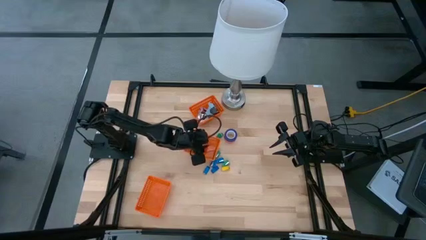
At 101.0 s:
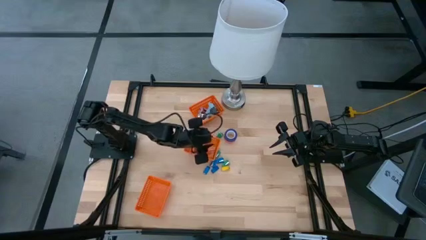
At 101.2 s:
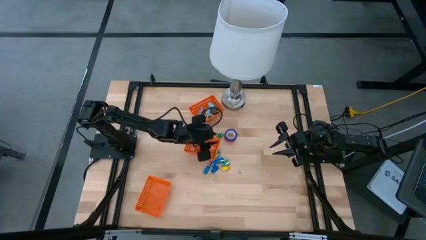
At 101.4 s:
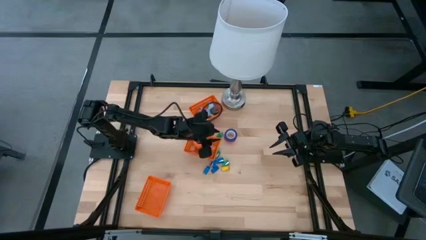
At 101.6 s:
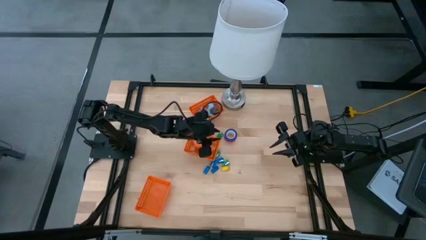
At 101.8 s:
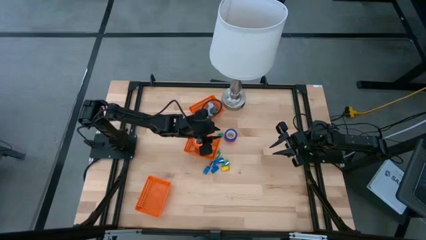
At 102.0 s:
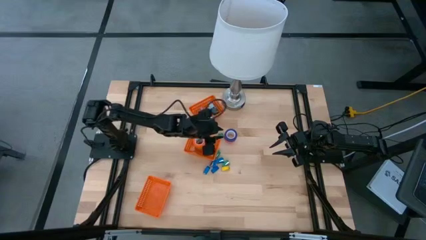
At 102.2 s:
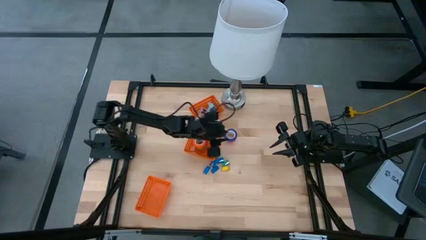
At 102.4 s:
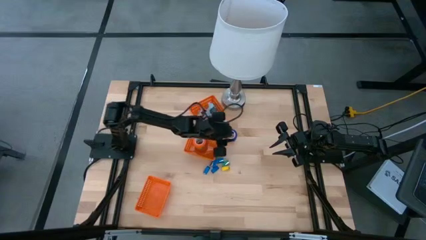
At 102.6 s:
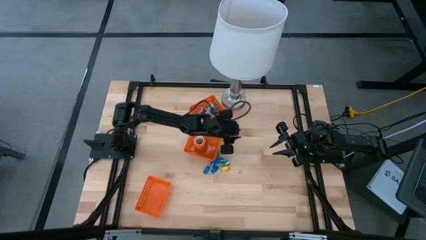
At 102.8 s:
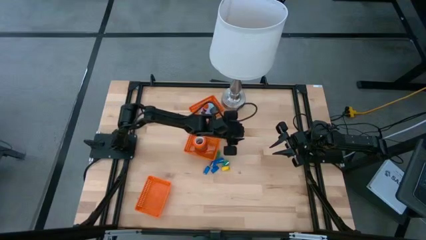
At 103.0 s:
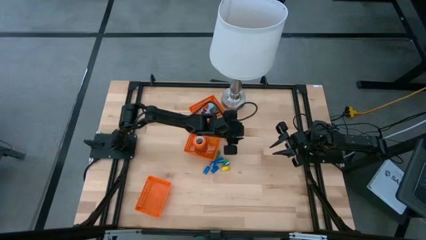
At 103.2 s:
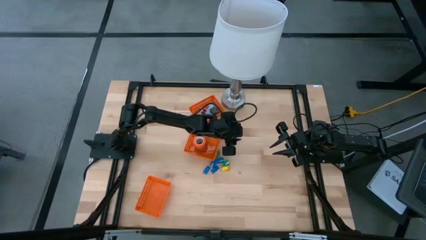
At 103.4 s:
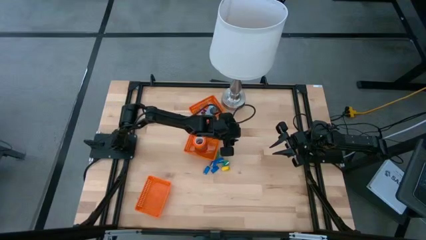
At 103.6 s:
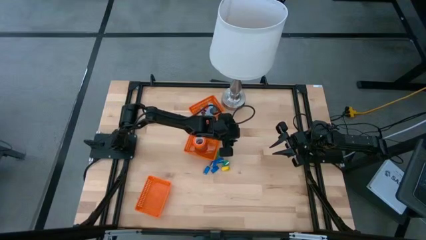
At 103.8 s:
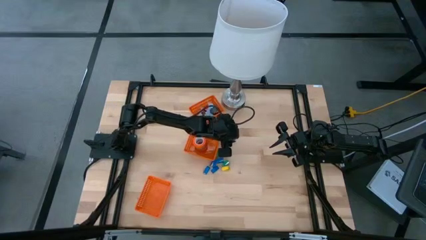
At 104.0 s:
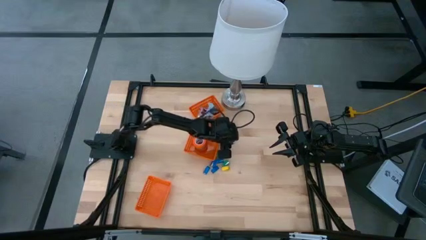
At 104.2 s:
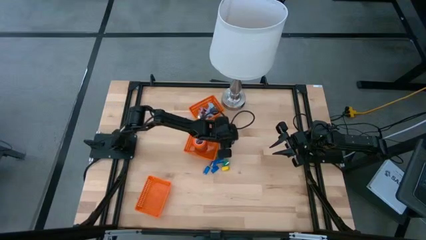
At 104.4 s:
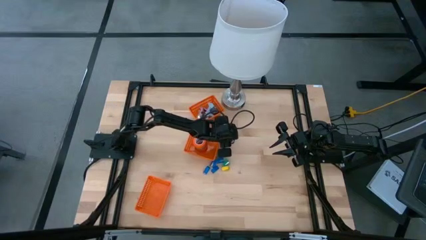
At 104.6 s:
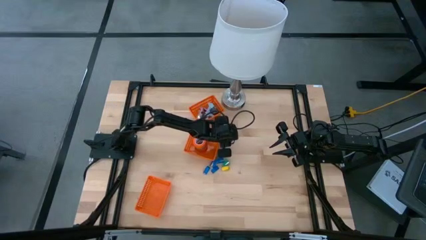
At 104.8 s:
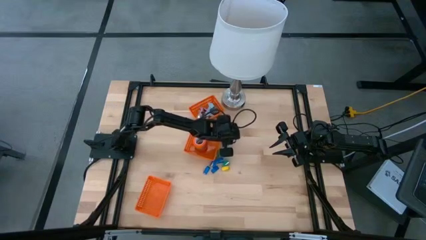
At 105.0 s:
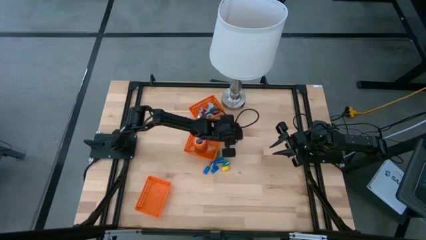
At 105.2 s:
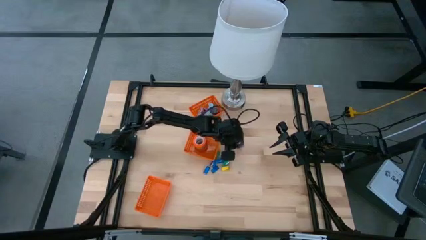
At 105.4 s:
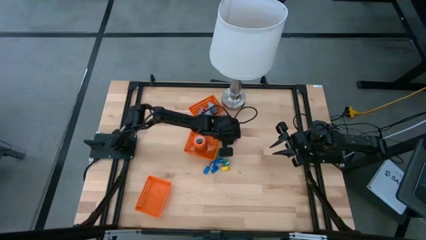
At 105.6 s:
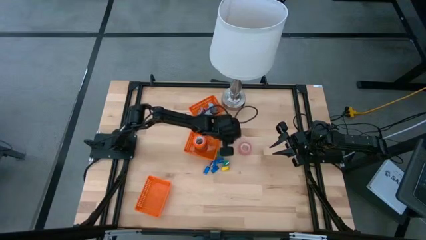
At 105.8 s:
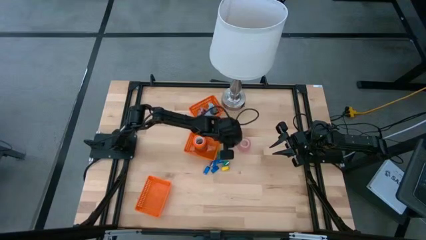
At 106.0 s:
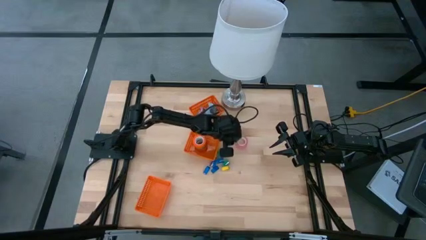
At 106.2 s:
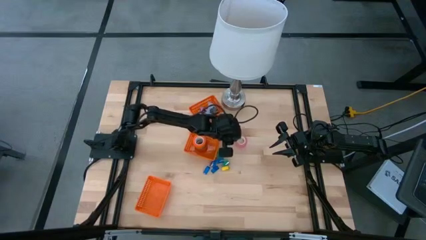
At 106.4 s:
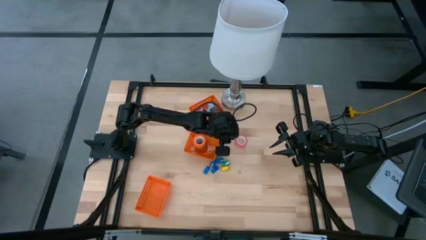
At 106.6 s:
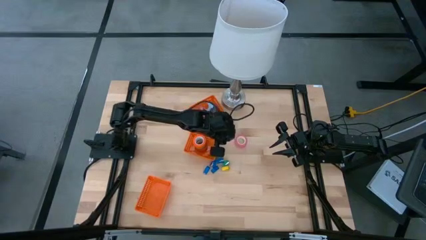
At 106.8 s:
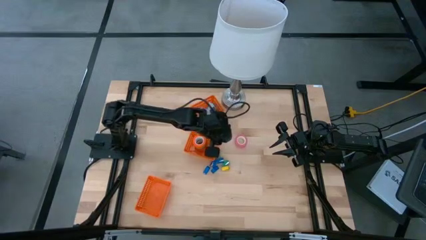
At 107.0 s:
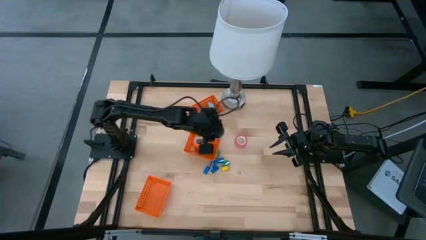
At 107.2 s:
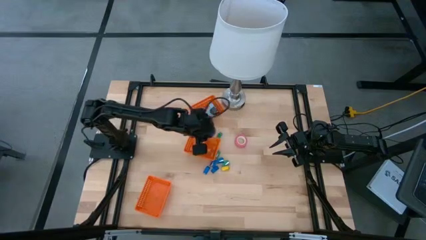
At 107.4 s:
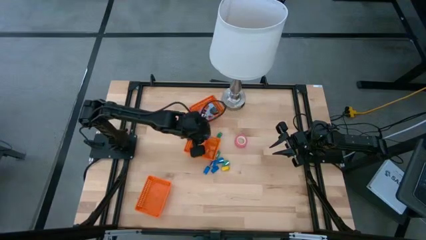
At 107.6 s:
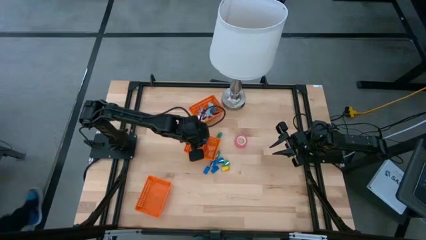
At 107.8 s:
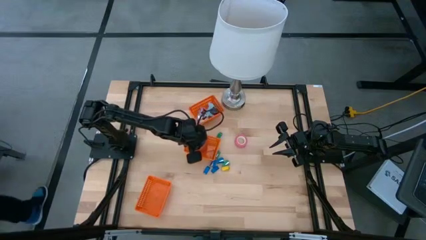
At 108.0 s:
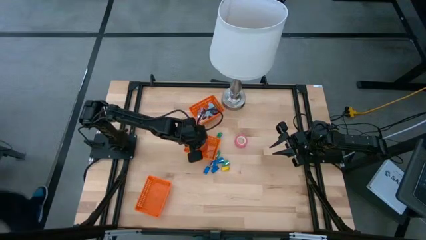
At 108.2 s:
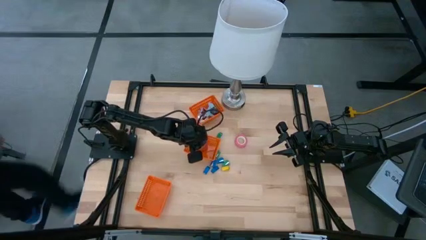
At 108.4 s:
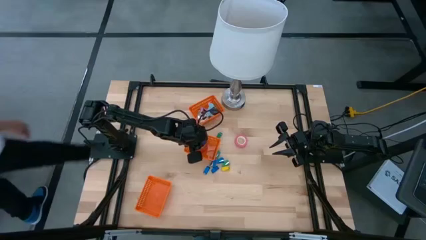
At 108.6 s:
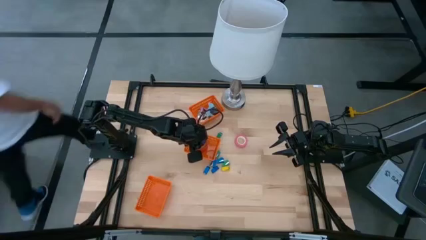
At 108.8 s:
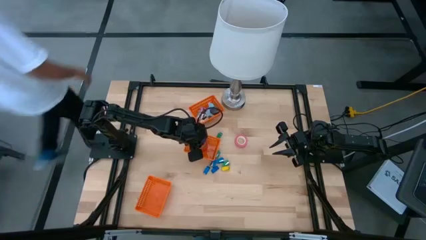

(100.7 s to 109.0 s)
Task: Pick and place Stapler, Stapler remover, tape
Put the blue tape into the middle orange bin

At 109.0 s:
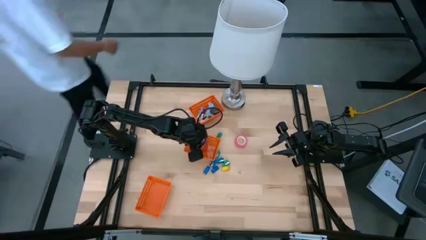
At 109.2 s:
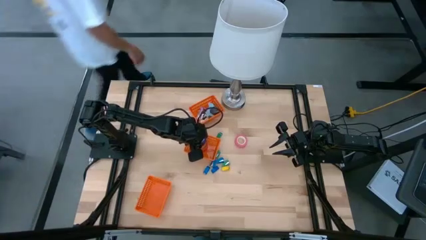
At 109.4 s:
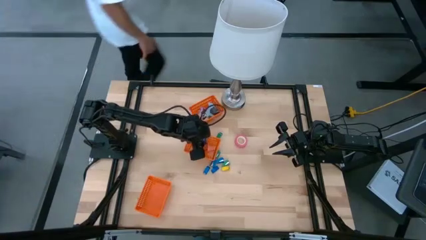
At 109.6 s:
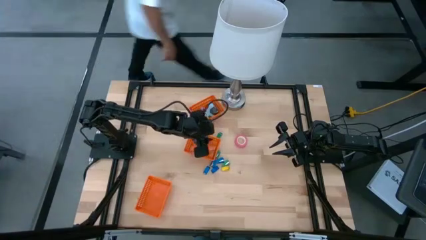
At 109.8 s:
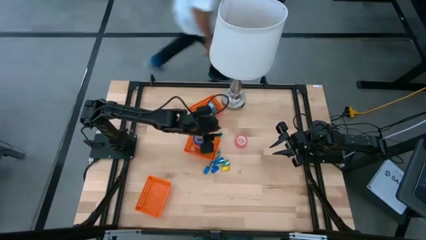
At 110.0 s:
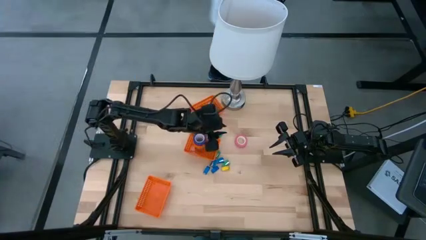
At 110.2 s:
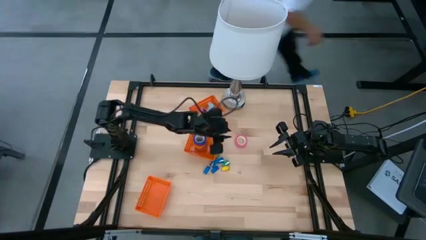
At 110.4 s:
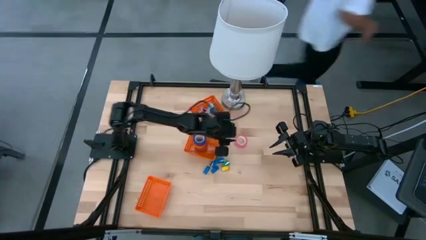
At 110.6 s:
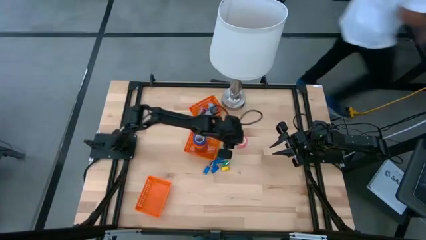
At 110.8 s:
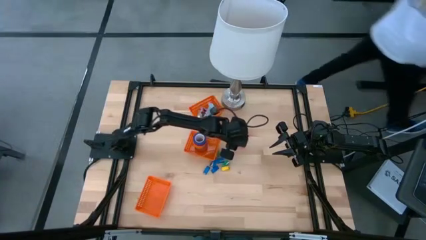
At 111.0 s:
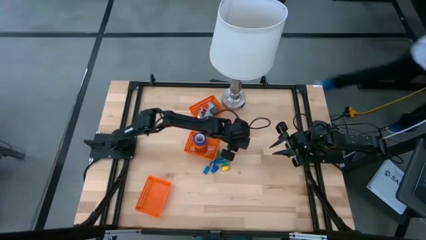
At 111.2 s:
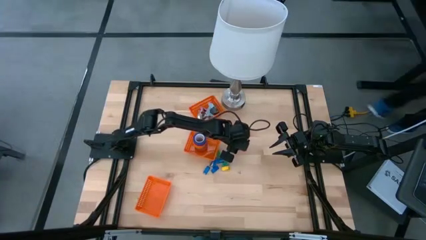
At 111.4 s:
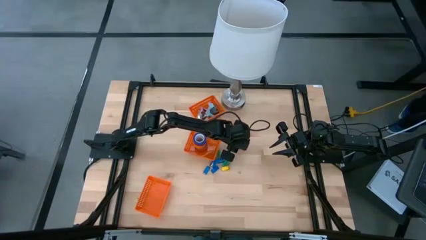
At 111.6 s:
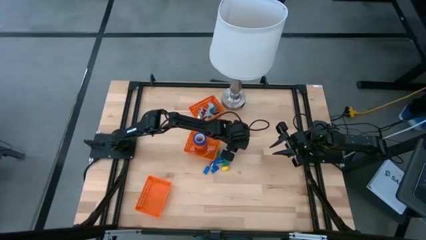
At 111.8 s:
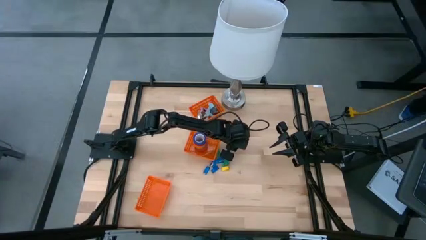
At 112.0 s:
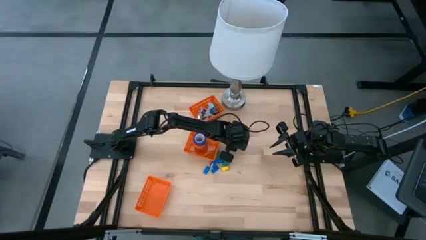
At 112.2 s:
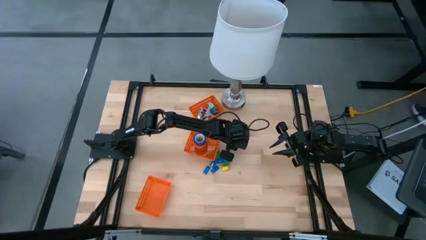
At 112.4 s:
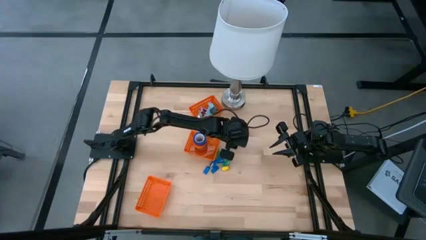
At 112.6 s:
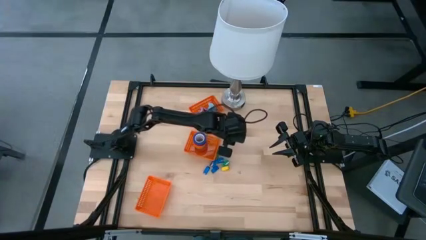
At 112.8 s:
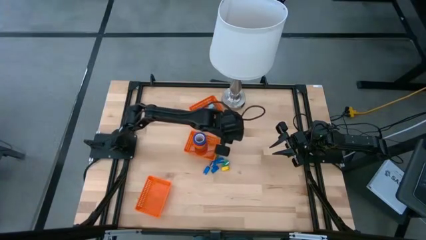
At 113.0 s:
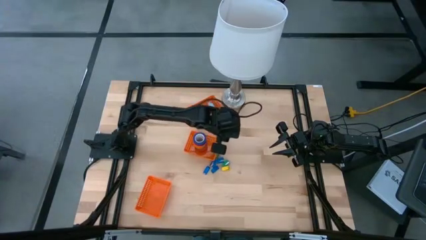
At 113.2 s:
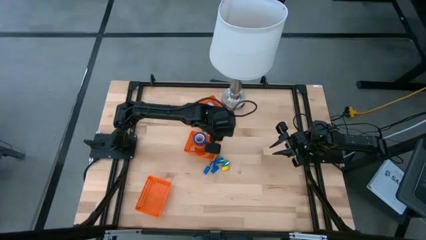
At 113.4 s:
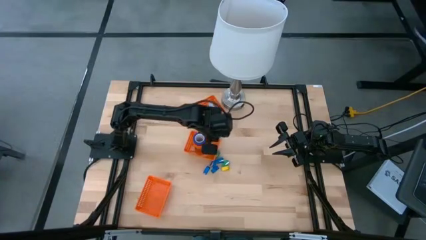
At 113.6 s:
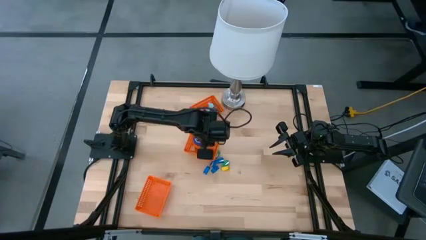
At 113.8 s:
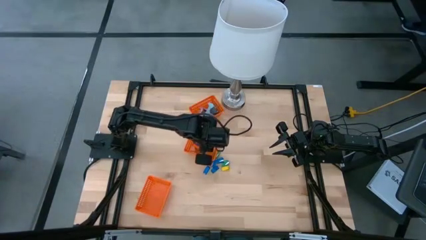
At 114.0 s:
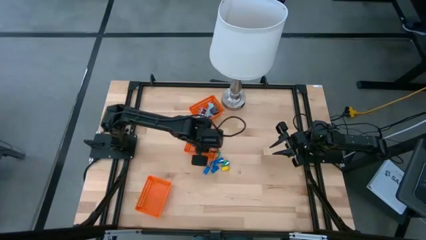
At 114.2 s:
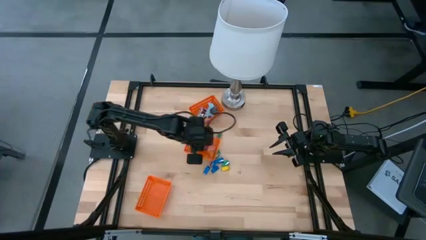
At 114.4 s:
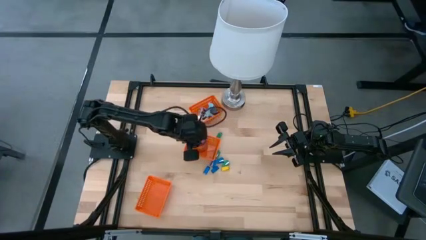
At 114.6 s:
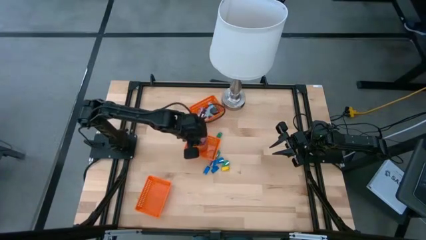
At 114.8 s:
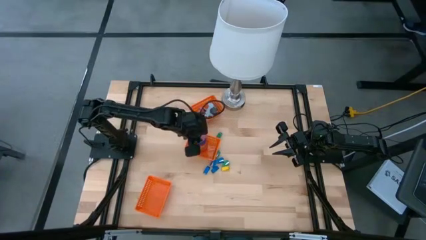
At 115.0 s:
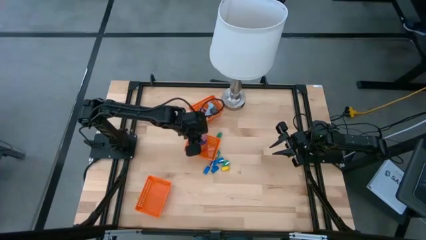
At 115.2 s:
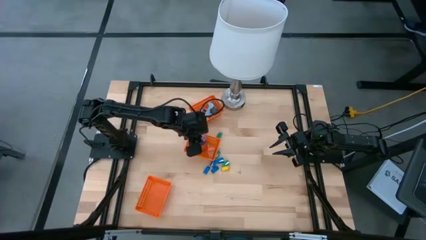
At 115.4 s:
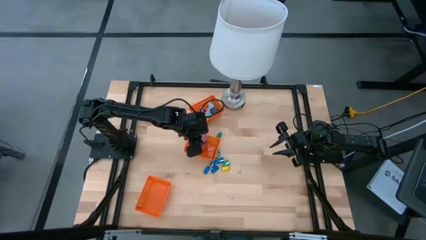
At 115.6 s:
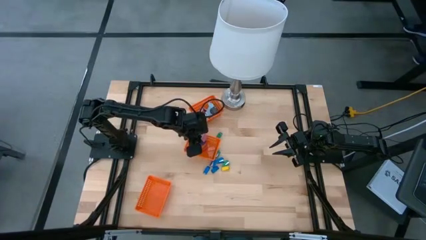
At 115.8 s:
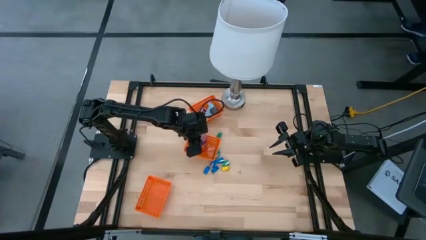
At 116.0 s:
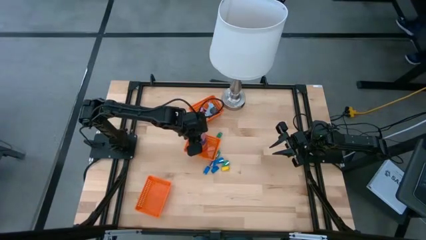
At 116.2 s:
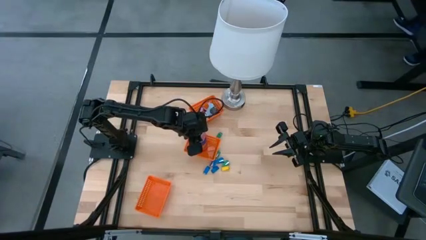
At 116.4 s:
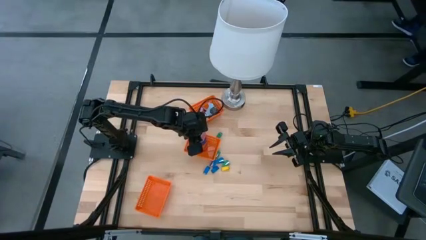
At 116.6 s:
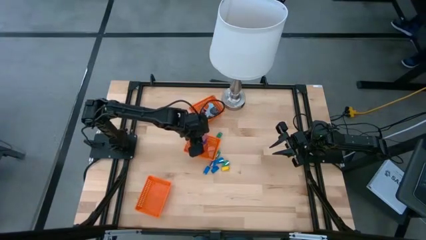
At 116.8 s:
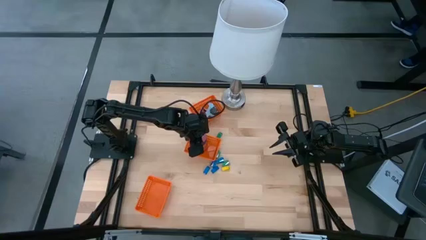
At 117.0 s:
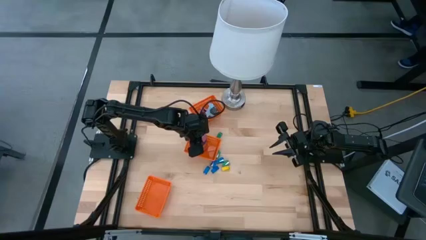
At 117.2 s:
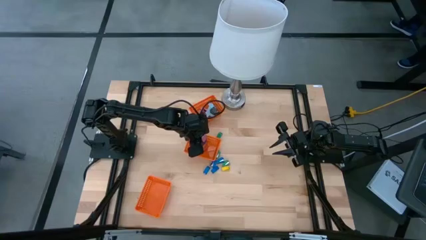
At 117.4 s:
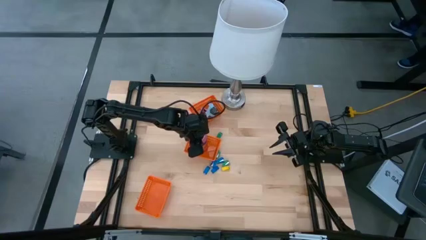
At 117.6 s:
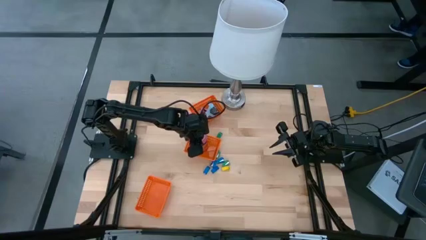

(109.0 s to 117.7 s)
Put the pink tape into the middle orange bin

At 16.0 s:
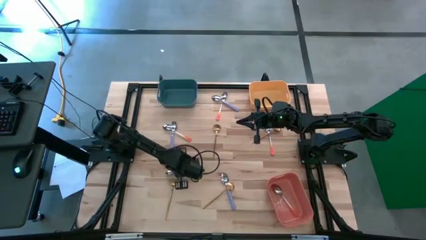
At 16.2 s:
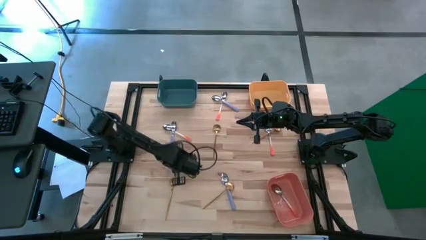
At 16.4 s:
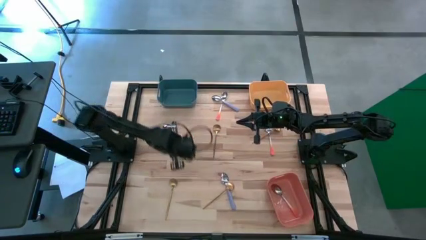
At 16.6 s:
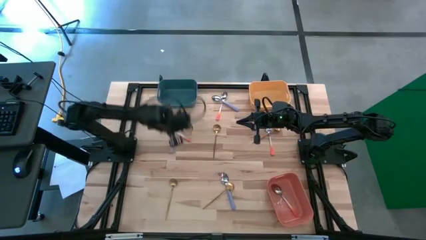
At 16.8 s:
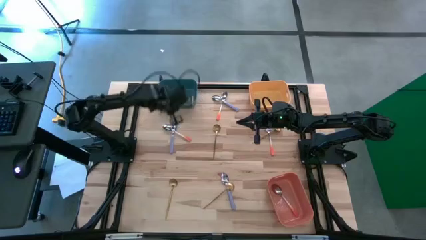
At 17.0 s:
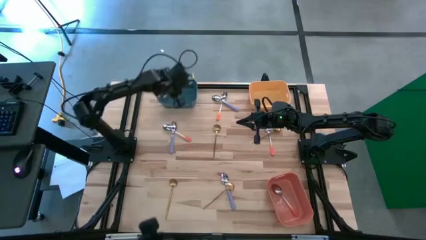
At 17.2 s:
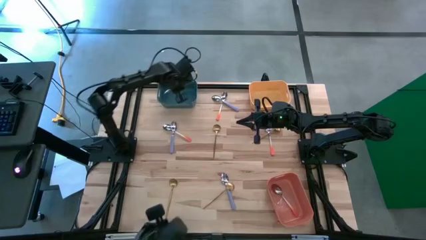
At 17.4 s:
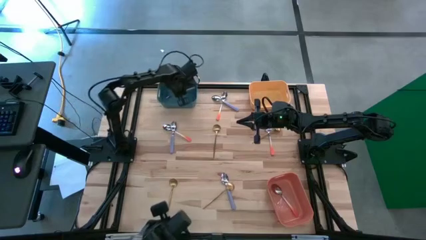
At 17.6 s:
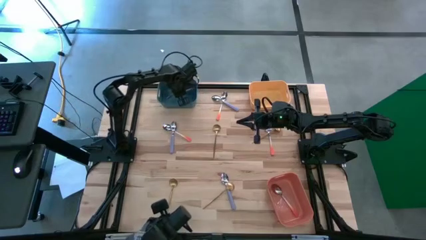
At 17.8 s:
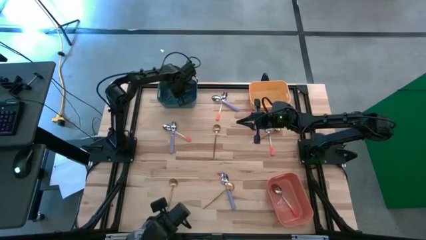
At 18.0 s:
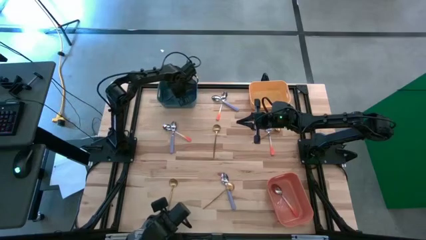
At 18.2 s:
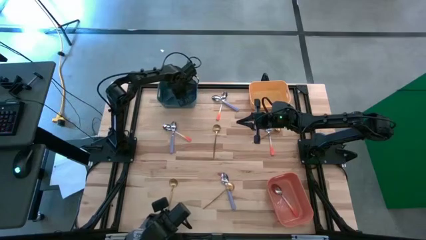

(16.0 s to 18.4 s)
Task: Sort silverware by color (type)
Put the bottom left violet spoon into the dark green bin
